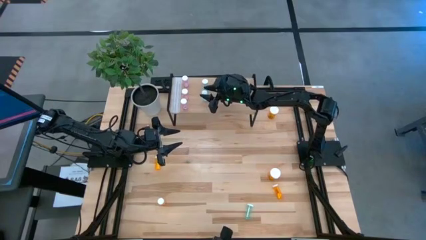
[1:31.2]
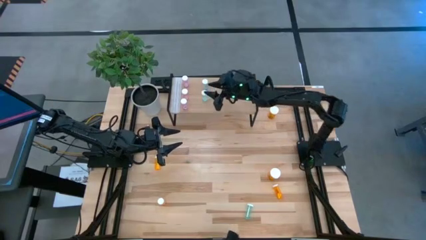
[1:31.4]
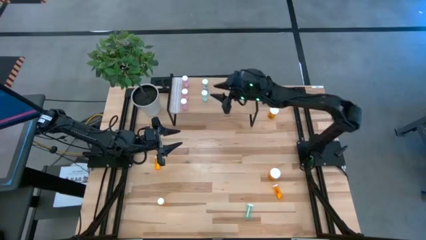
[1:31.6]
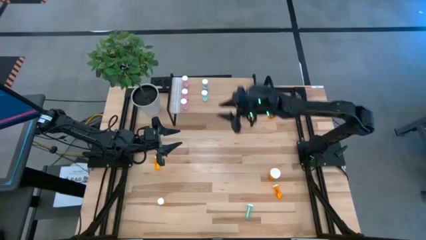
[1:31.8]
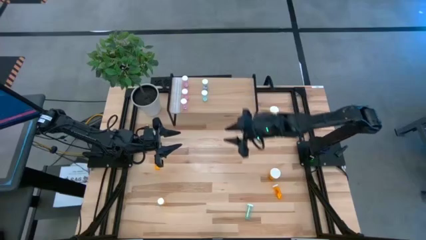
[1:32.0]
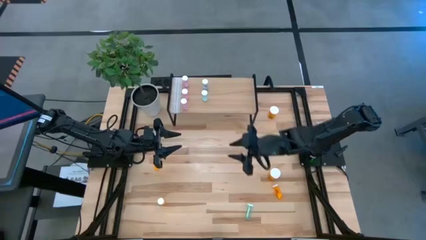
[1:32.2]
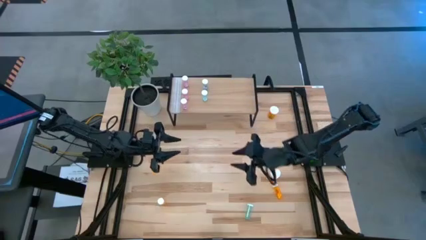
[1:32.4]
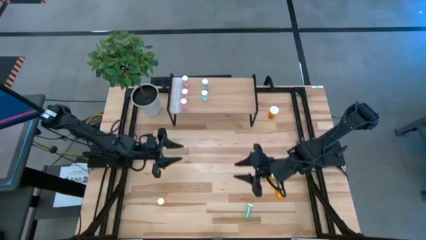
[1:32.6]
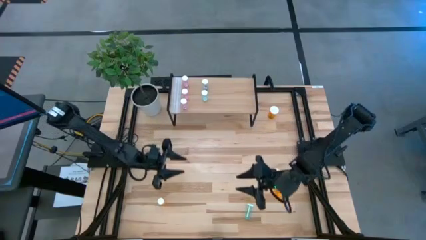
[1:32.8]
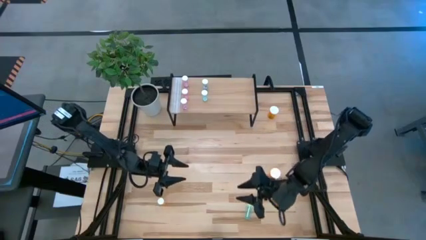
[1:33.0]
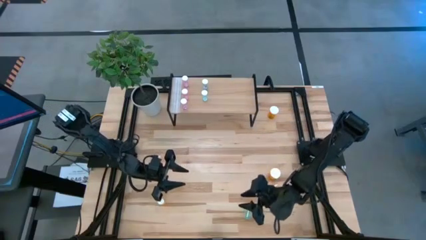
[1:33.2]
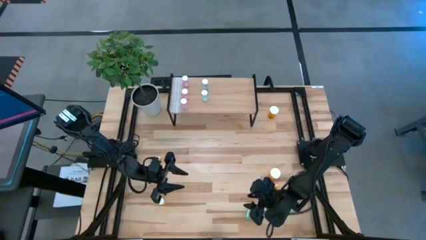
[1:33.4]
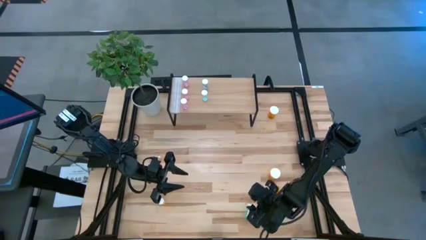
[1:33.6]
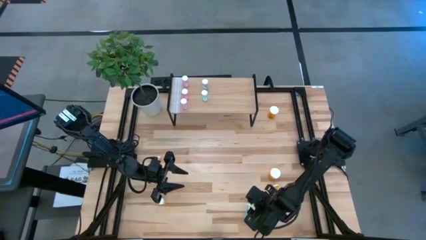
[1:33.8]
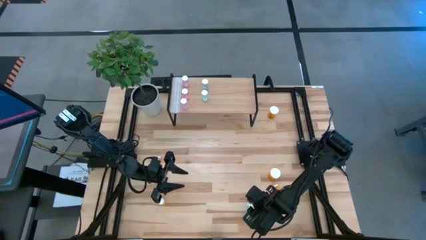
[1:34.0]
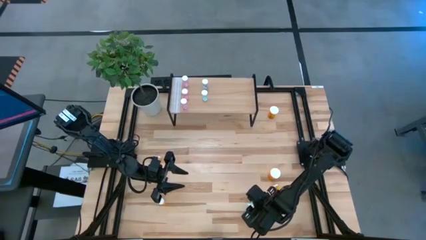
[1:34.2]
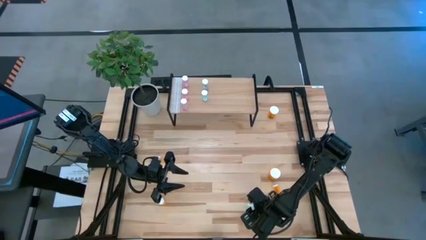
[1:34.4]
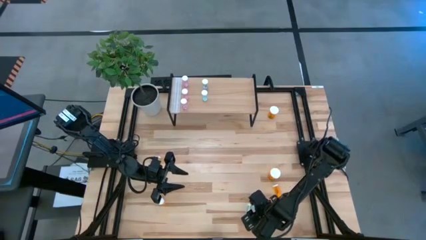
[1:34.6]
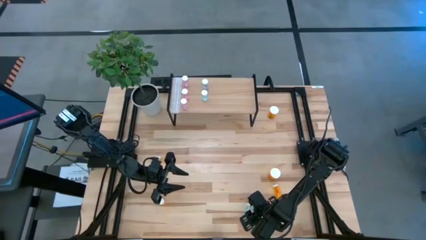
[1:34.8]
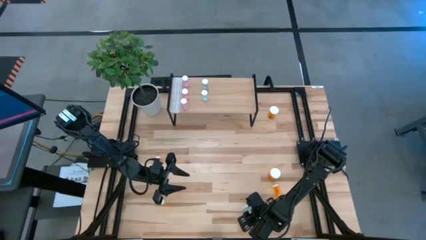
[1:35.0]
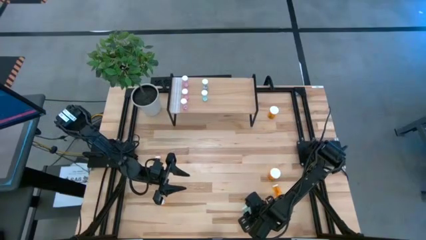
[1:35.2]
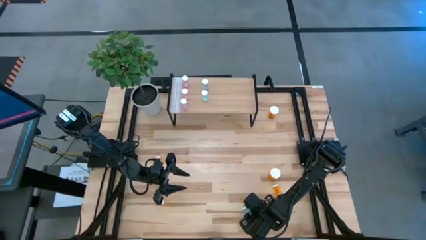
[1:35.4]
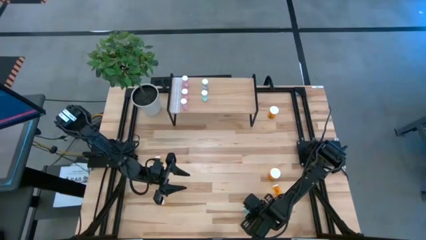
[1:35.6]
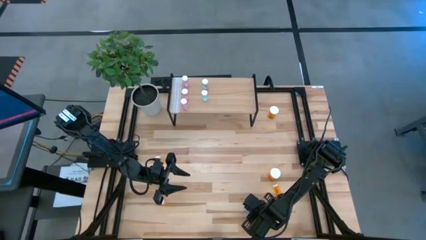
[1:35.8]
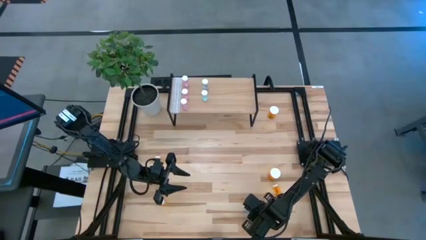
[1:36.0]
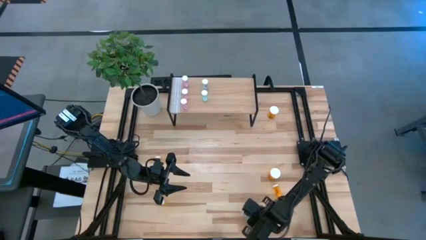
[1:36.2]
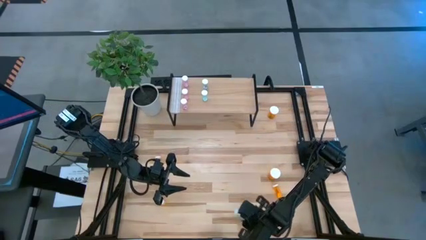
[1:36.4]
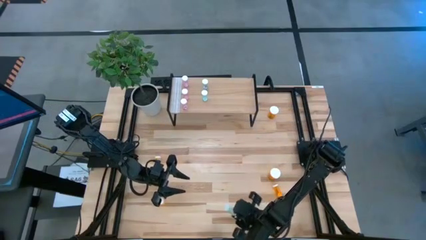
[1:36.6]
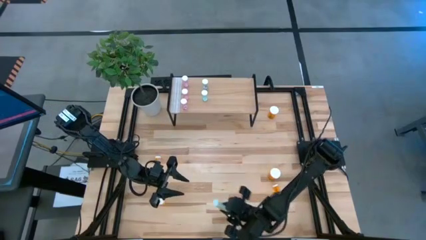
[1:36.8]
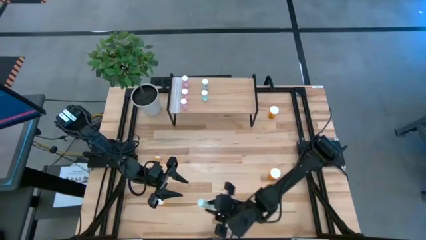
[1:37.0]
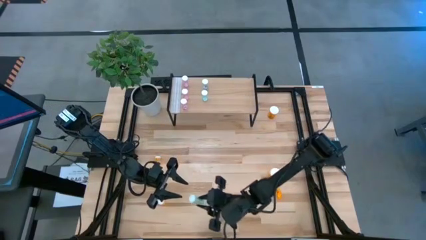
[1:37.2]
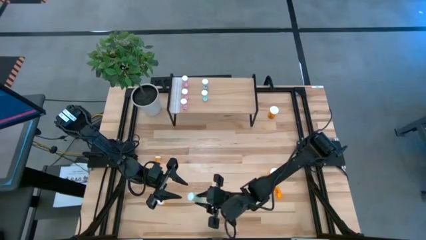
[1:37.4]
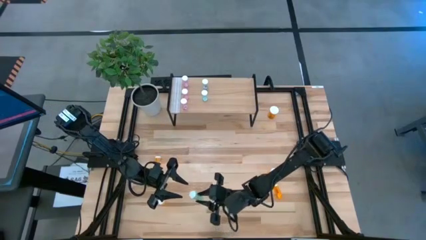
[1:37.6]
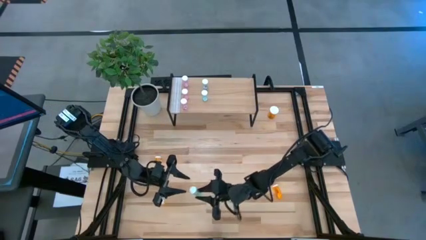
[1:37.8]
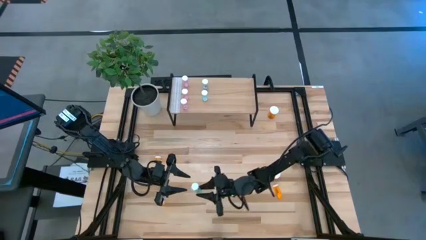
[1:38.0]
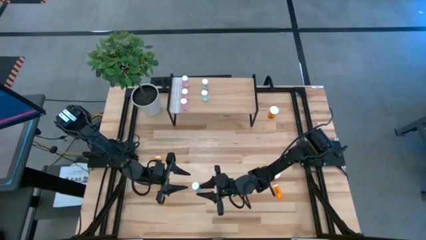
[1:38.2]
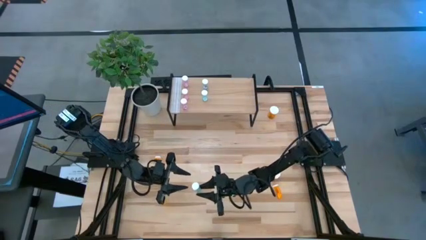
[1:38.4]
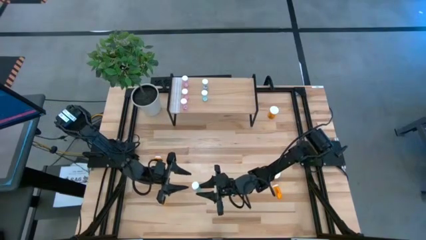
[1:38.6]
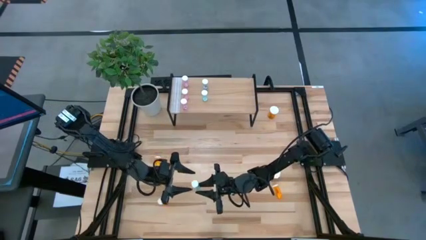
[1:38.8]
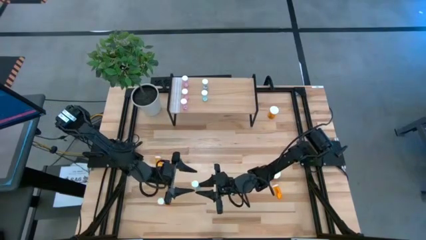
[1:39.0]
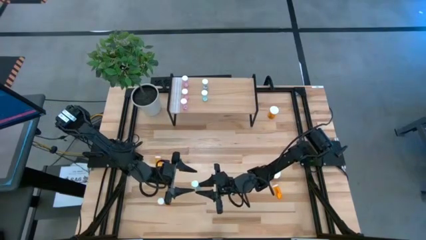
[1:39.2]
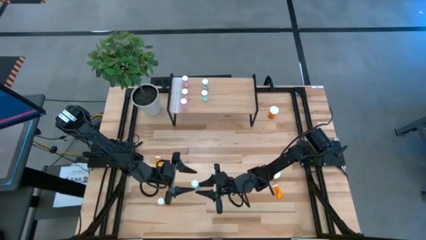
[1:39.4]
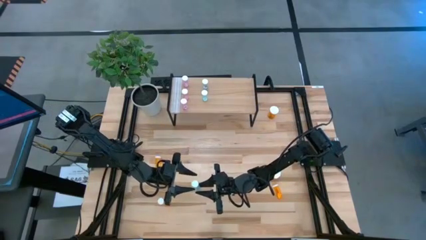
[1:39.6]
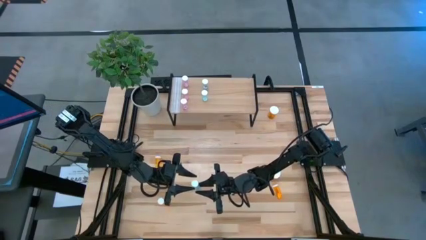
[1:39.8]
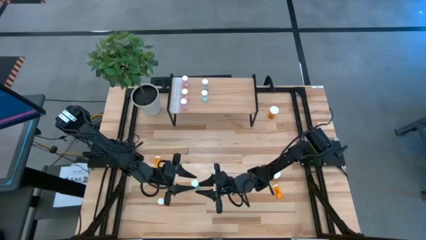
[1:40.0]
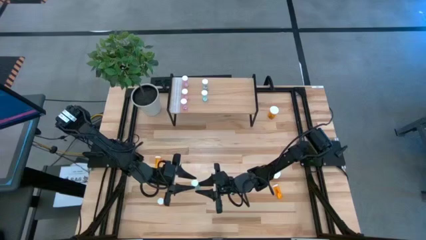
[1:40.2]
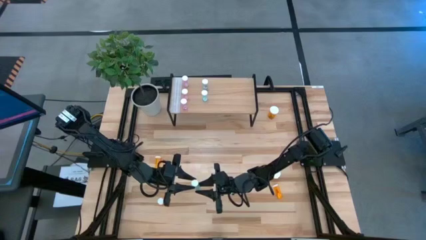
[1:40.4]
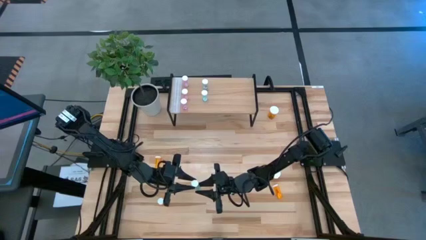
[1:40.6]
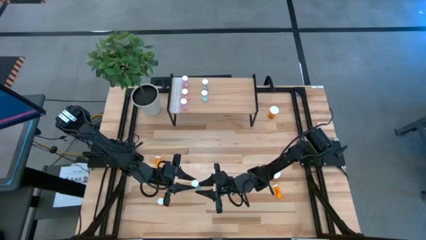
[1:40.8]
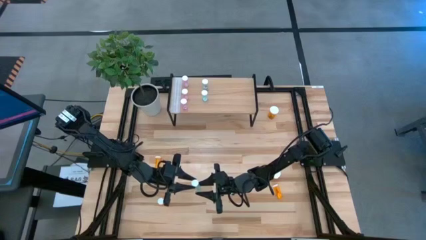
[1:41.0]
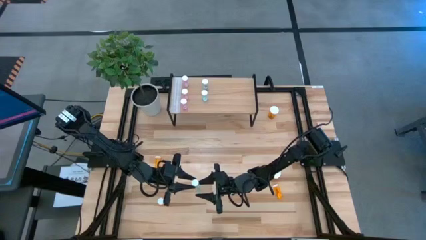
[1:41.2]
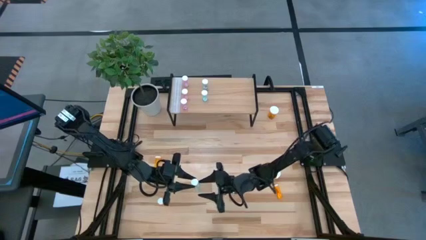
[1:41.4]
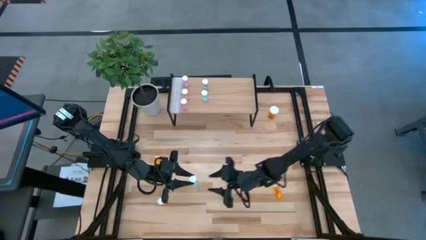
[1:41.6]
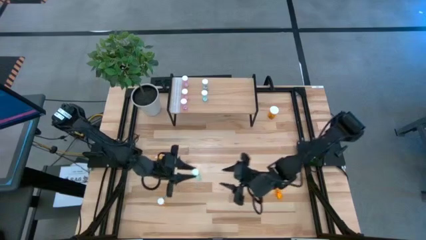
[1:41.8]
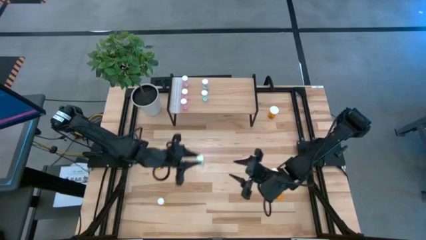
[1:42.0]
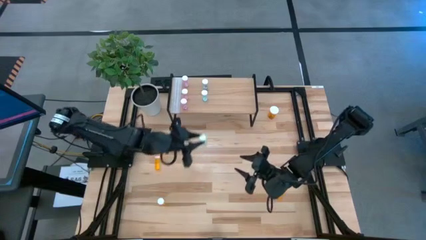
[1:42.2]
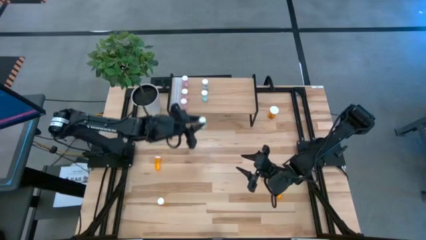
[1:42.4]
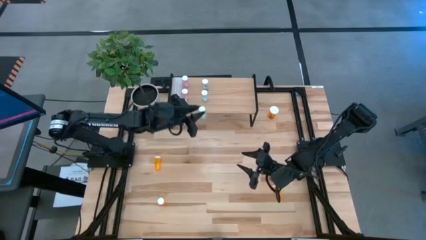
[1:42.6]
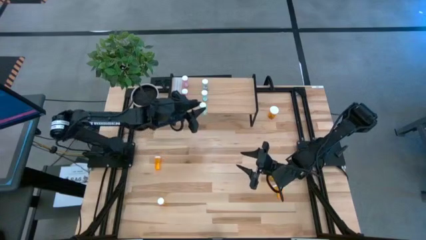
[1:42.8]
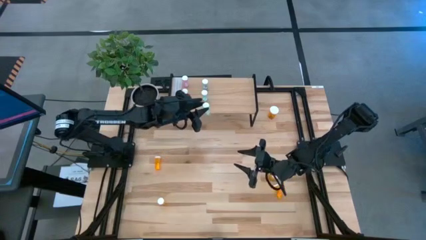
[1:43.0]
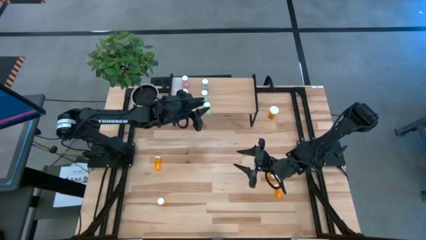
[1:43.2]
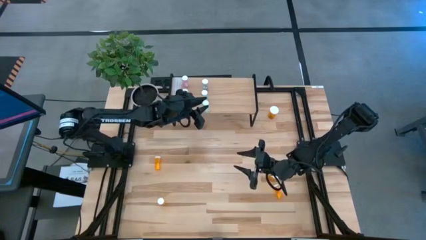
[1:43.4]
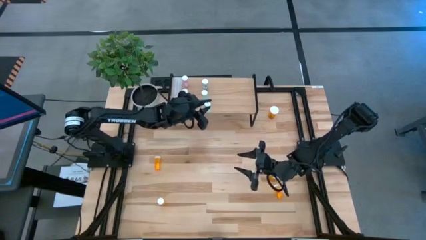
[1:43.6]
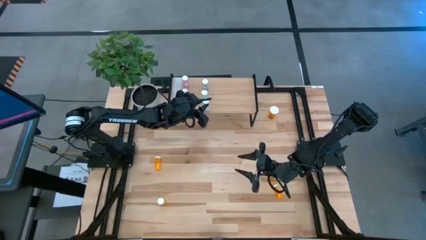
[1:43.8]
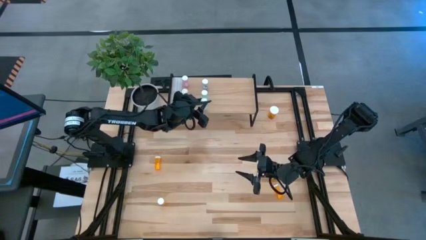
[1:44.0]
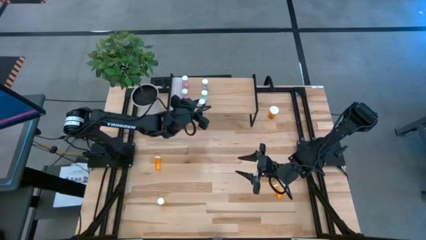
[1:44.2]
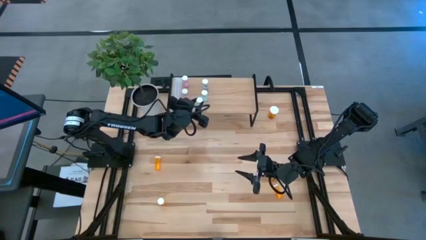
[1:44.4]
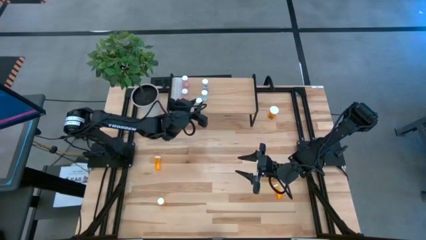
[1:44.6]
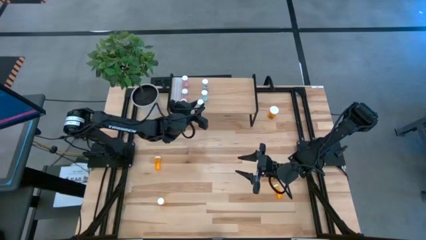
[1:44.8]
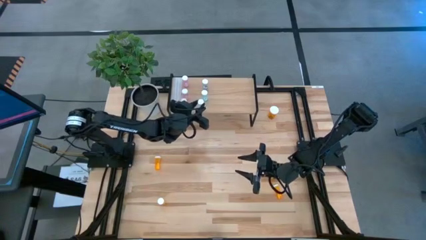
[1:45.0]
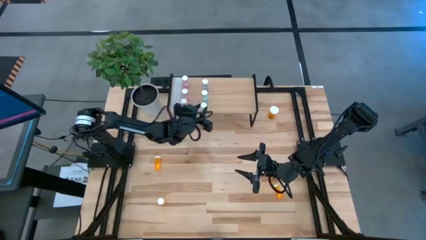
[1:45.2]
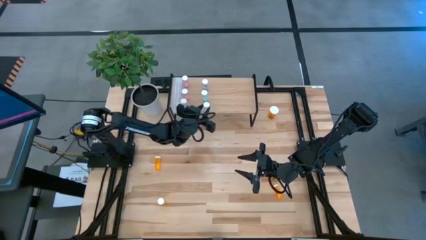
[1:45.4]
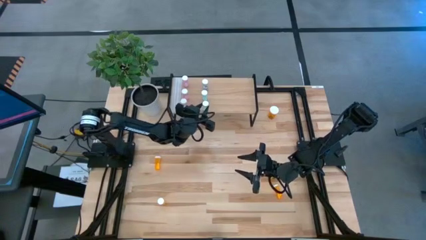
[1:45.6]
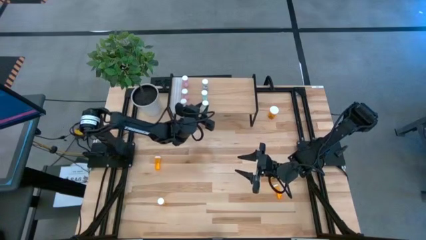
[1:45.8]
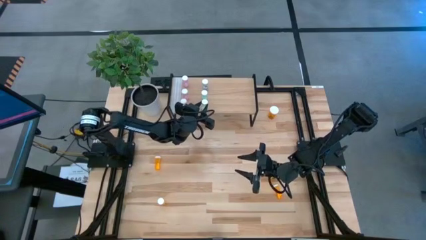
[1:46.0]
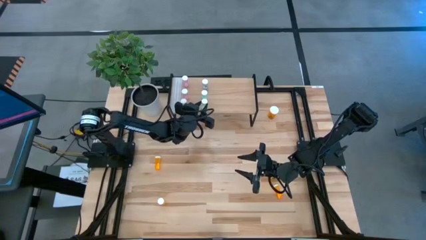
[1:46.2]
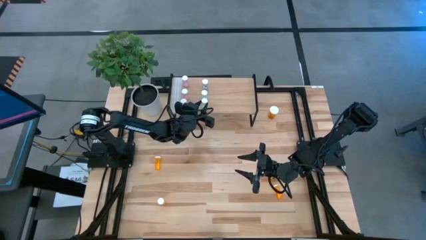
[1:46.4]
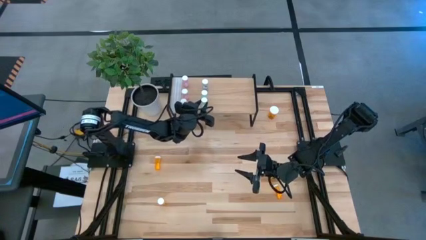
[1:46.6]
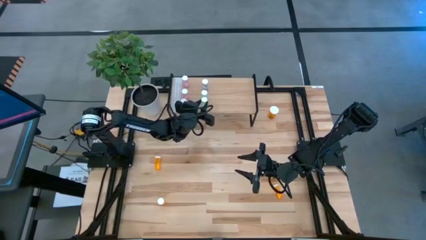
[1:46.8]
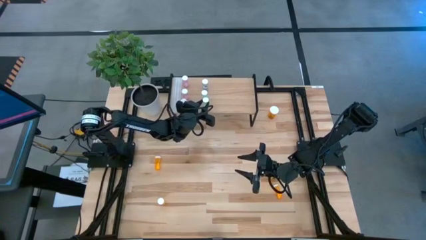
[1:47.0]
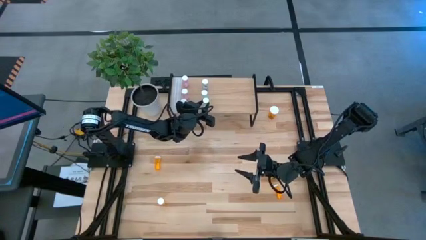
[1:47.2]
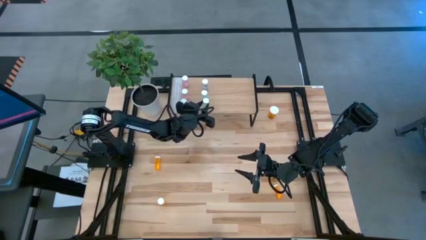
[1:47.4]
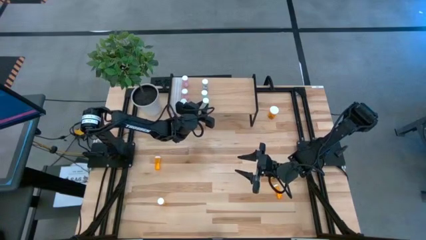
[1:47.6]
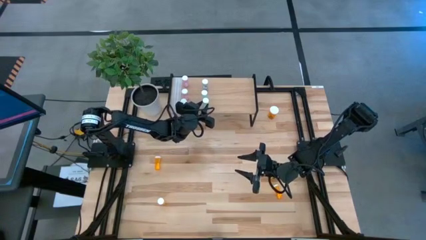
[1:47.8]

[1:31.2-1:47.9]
Task: Pick and place medicine bottles onto shelf by color
Put the blue pill bottle aligned with the other blue pill bottles on the shelf
